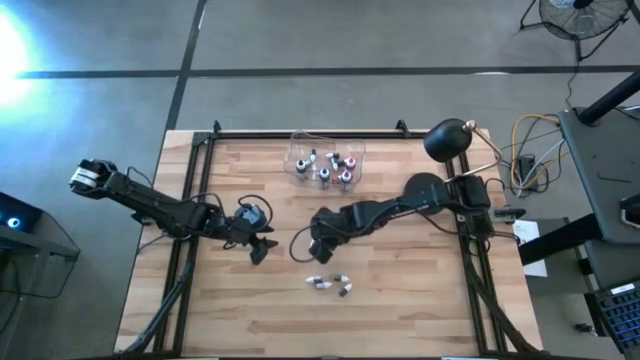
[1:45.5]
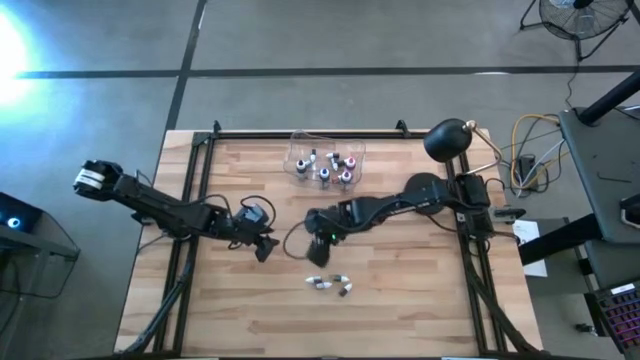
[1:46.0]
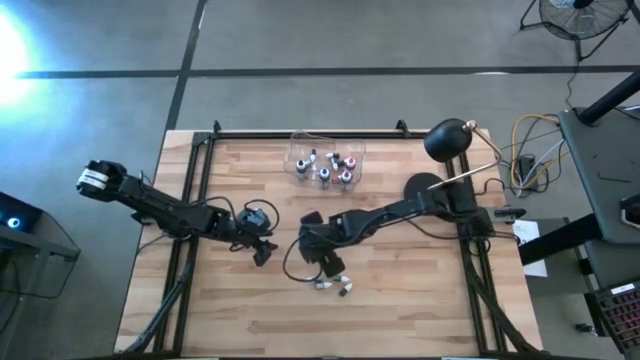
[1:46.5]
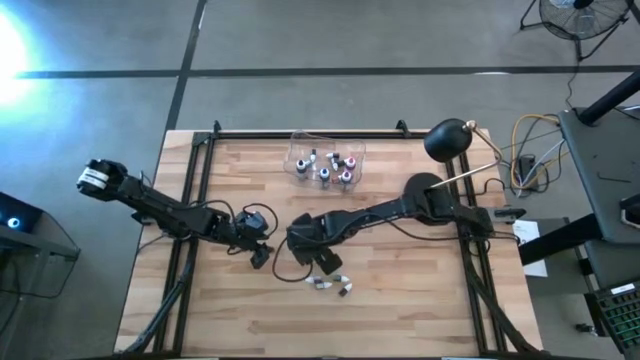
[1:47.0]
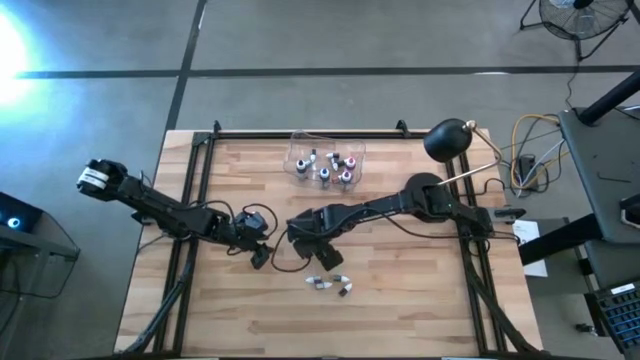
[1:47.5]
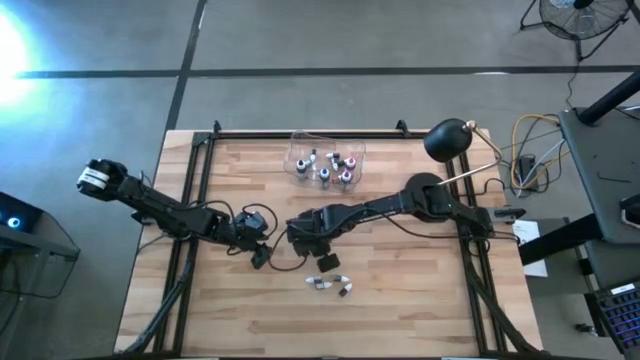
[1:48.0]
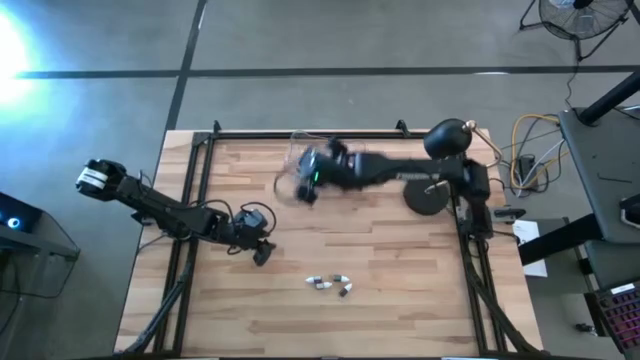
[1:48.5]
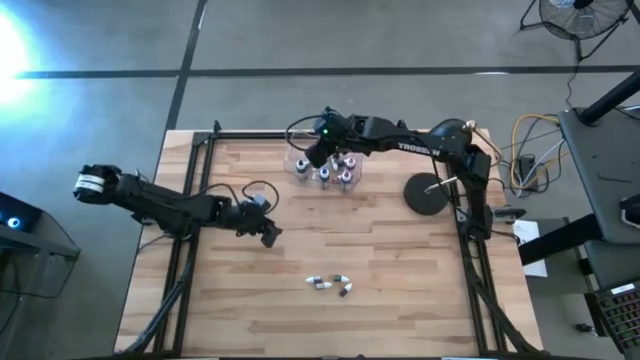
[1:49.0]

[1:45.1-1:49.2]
Task: Pick & Place food coloring
Put the small green food coloring bottle into the transparent bin

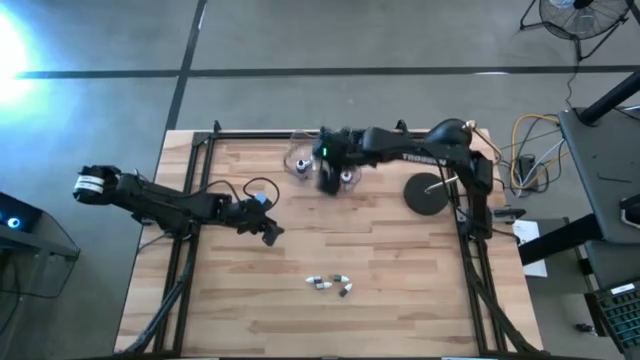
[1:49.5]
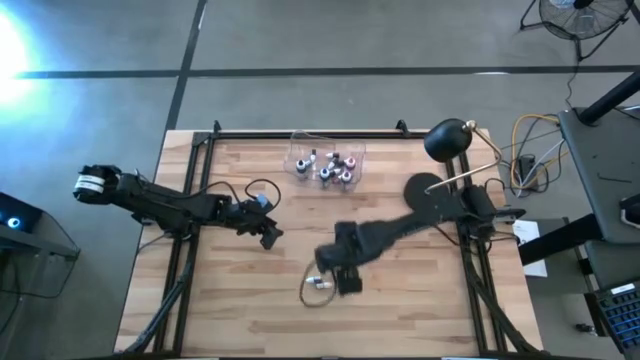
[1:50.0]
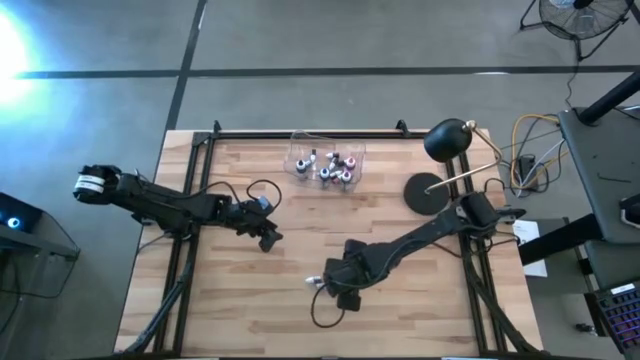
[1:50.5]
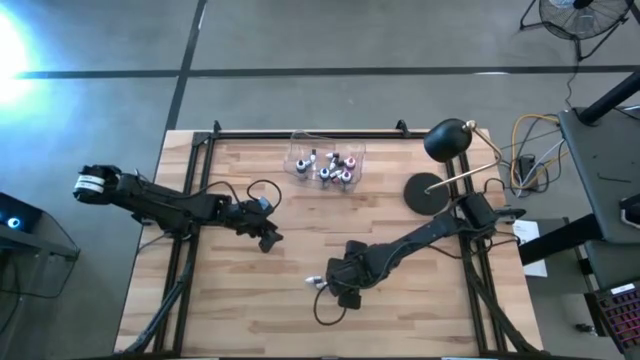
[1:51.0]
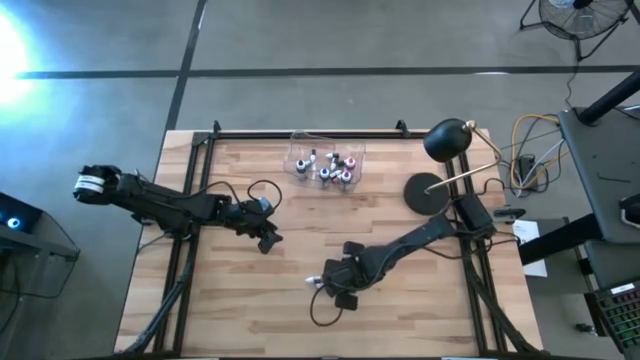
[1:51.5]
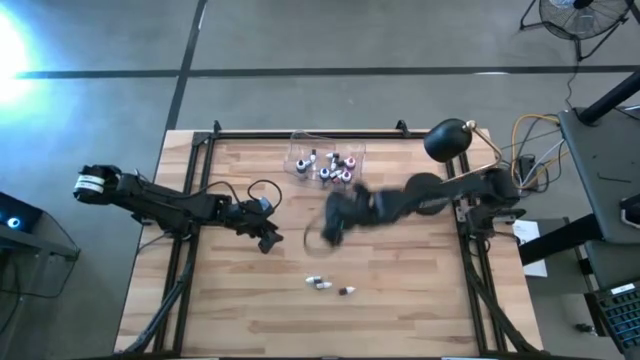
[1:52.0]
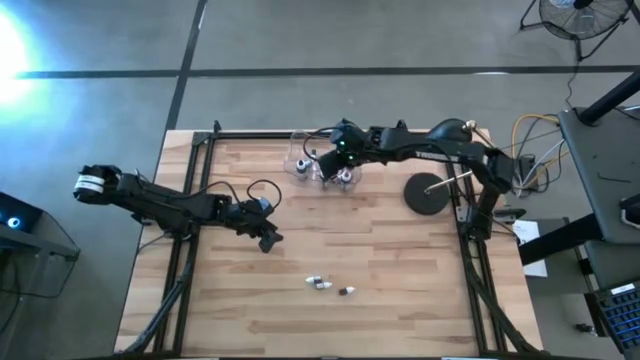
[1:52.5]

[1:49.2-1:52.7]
Put the small green food coloring bottle into the transparent bin

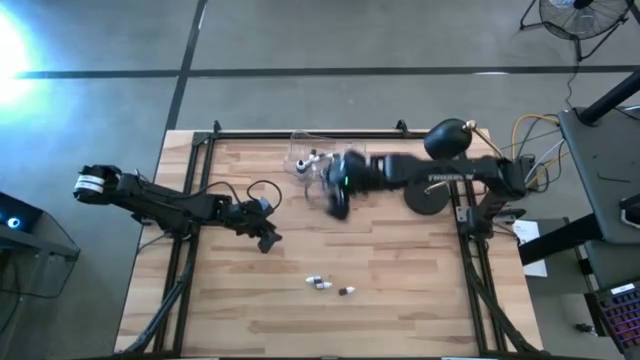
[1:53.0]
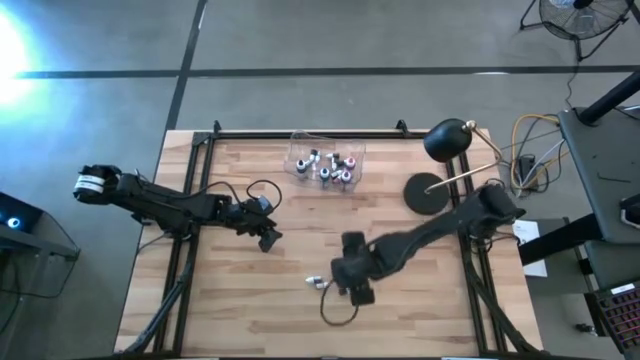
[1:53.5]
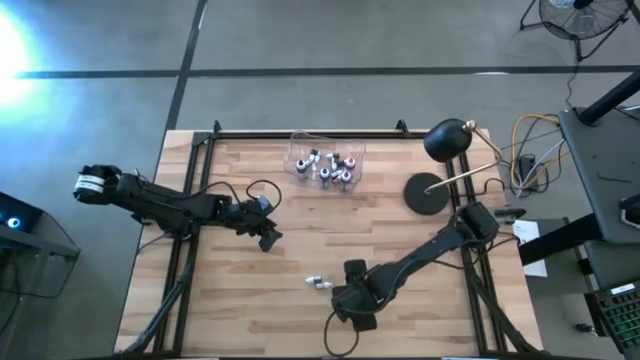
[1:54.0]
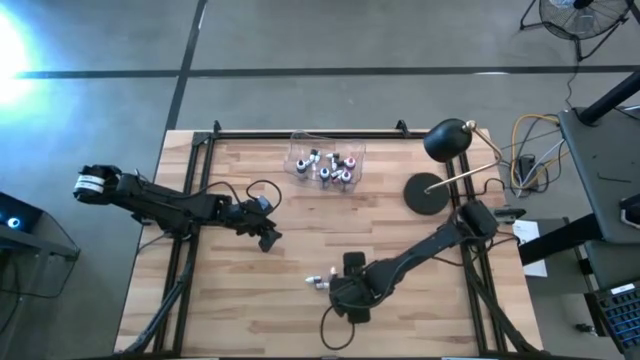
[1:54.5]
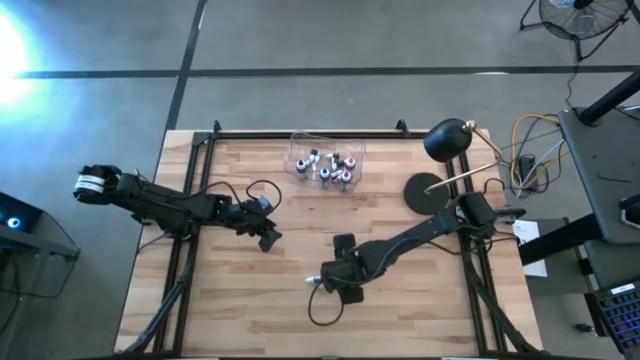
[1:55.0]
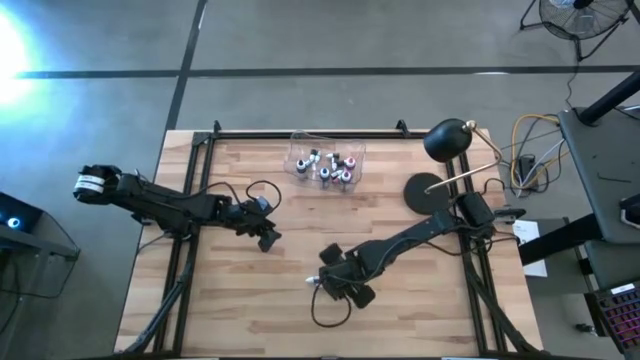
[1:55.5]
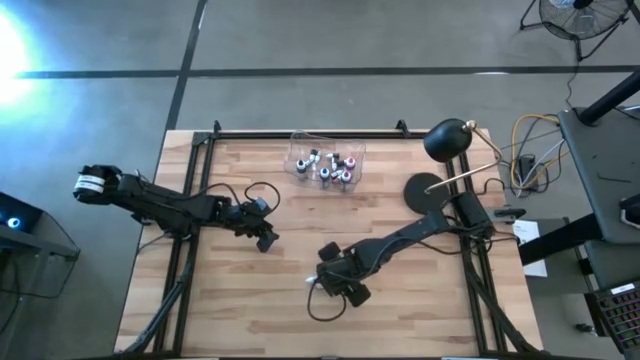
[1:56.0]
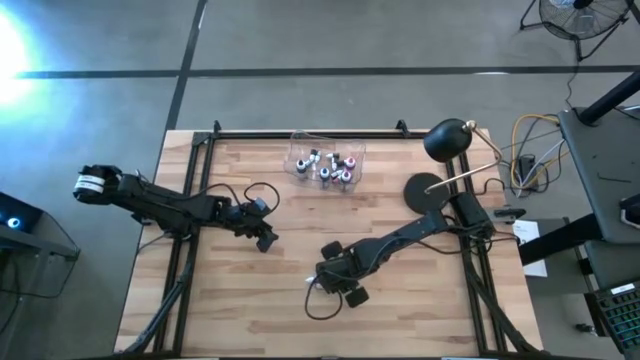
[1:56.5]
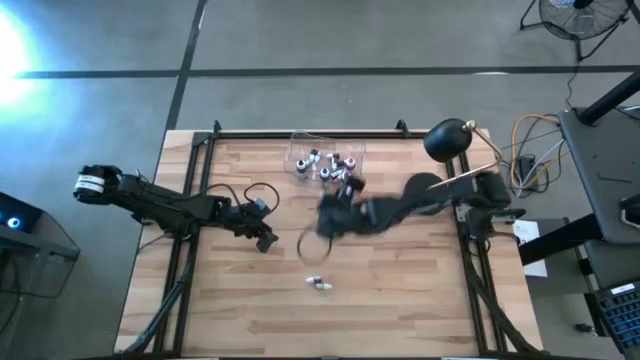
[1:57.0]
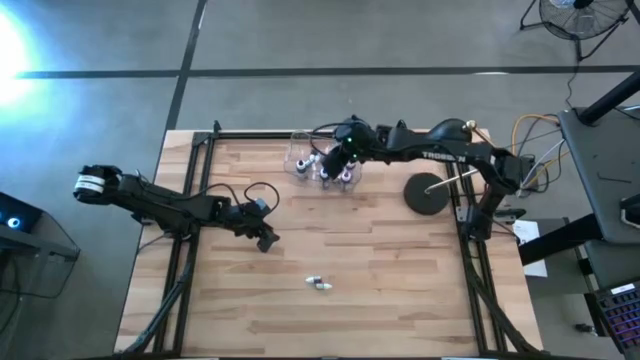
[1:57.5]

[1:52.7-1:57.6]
Put the small red food coloring bottle into the transparent bin

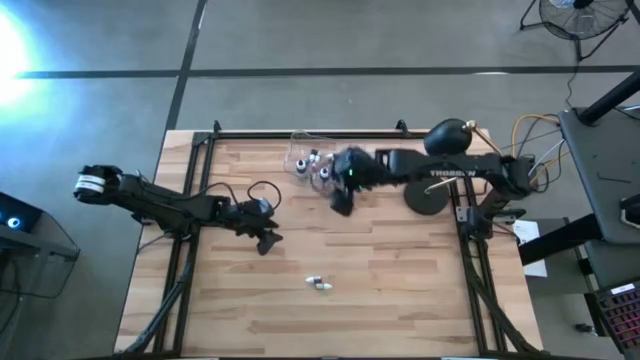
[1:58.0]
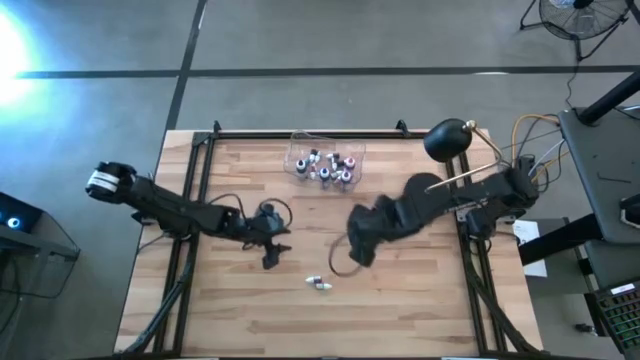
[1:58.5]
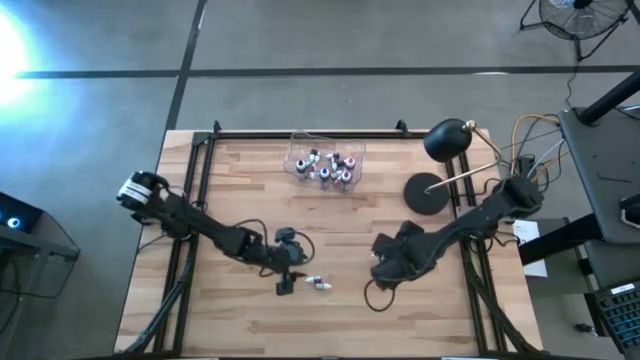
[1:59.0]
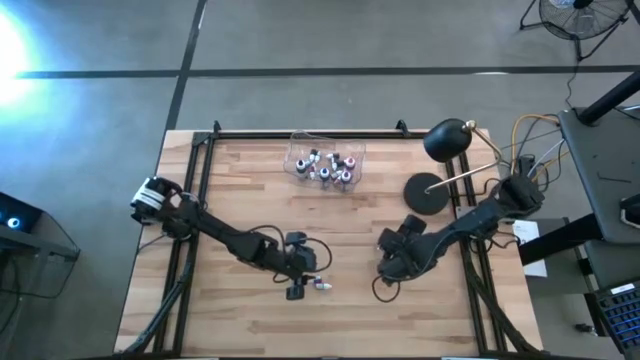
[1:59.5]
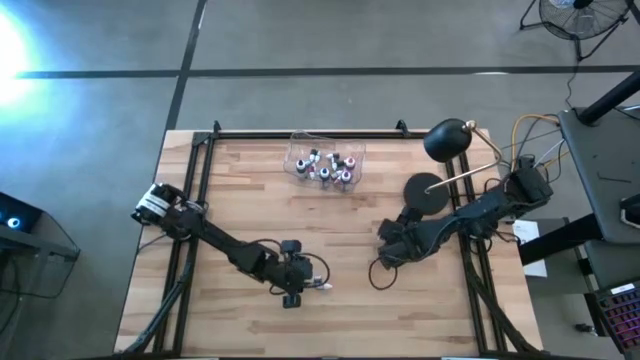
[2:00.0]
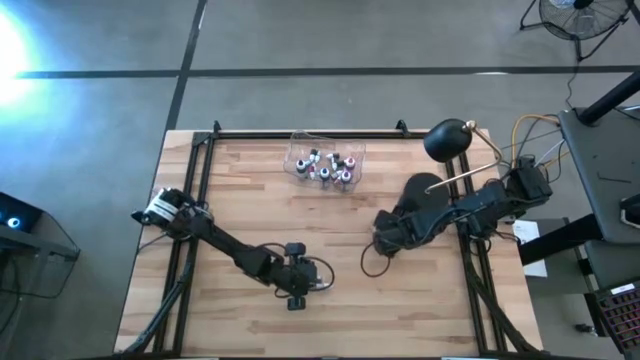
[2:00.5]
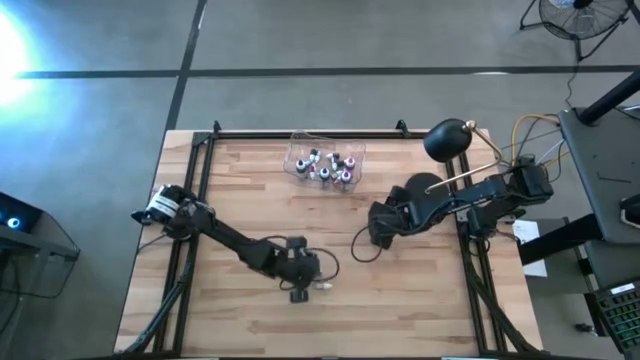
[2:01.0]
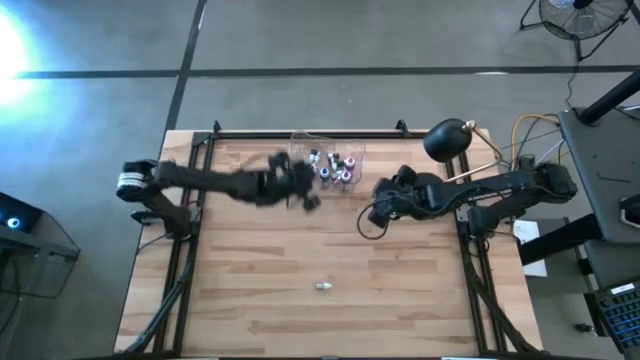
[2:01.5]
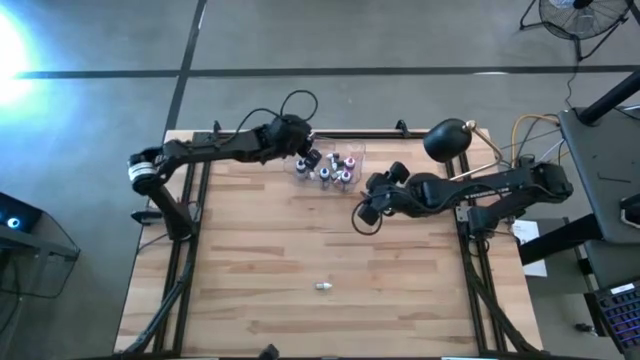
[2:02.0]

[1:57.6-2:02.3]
Put the small purple food coloring bottle into the transparent bin

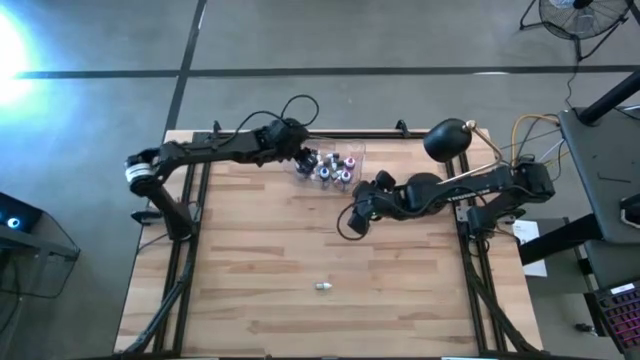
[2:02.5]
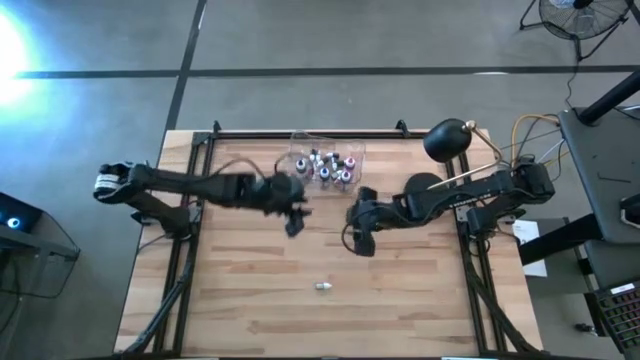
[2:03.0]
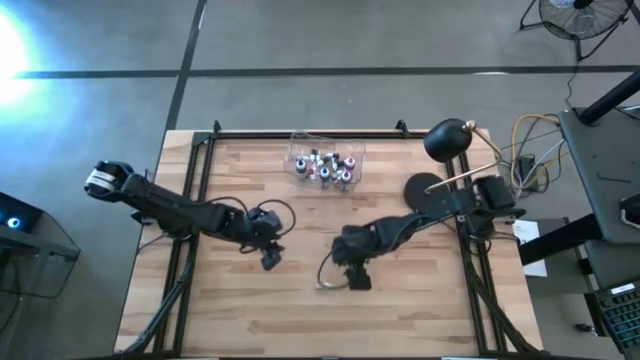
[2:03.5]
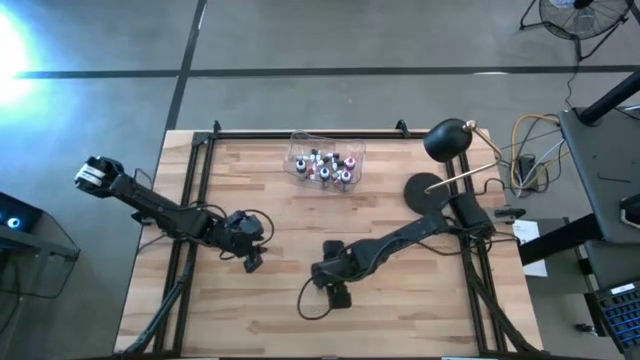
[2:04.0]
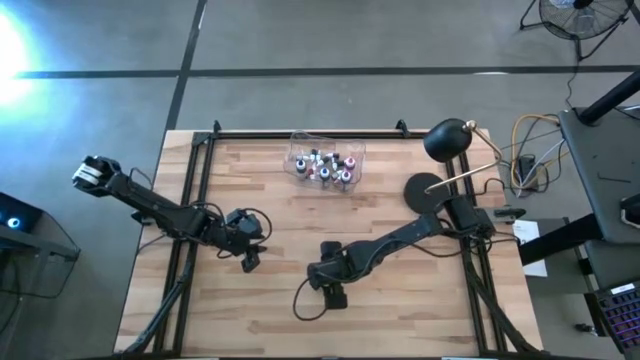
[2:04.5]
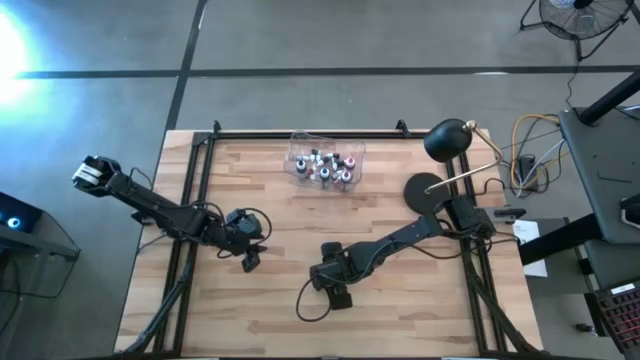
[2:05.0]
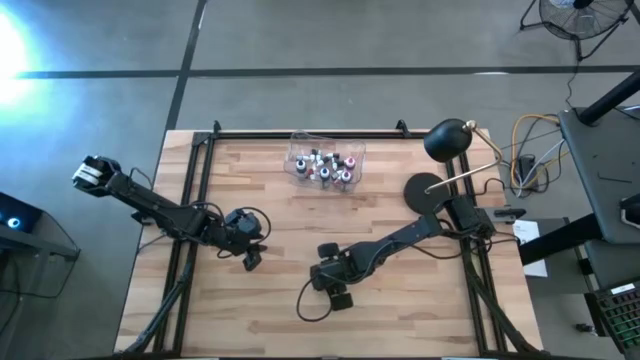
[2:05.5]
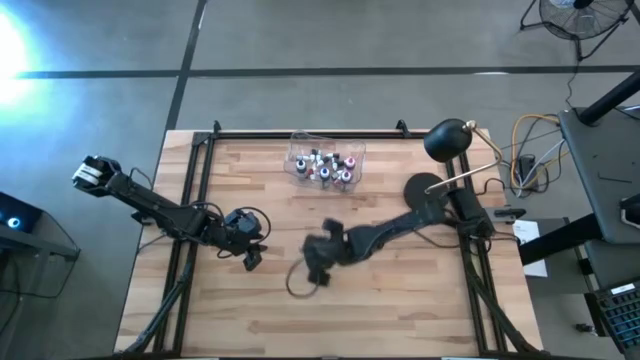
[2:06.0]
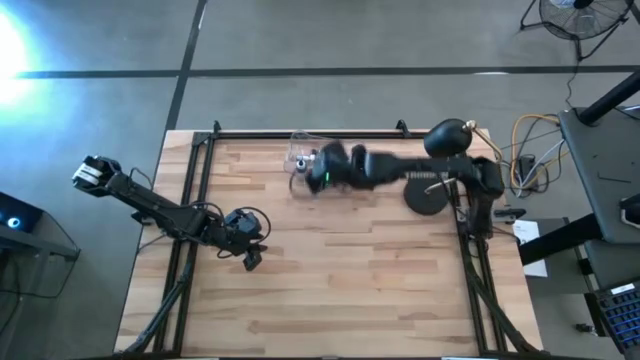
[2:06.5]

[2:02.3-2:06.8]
Put the small red food coloring bottle into the transparent bin
